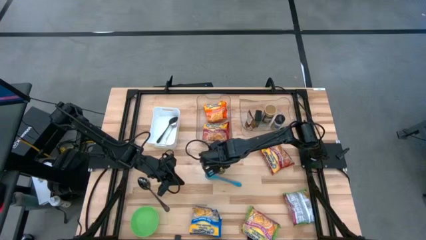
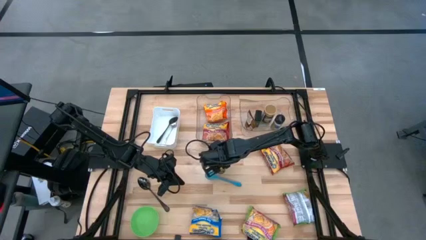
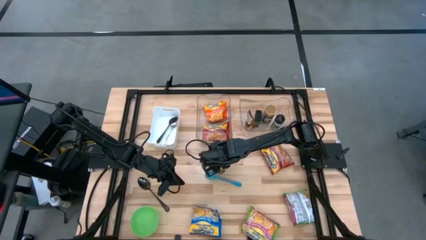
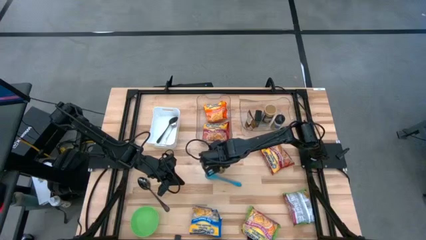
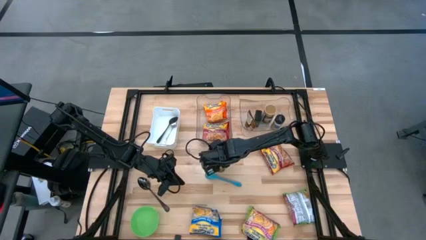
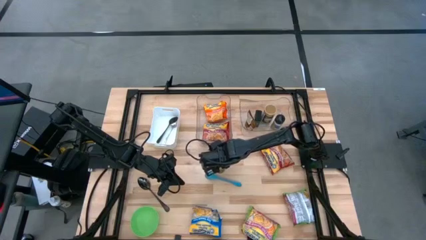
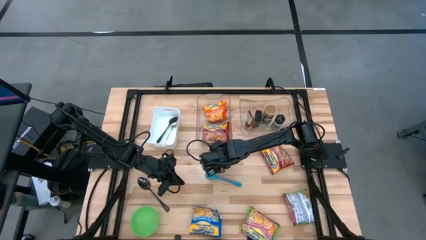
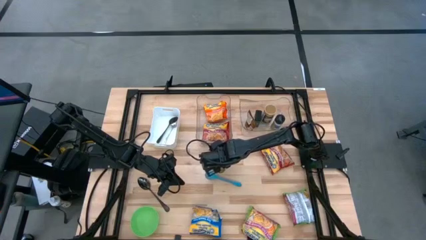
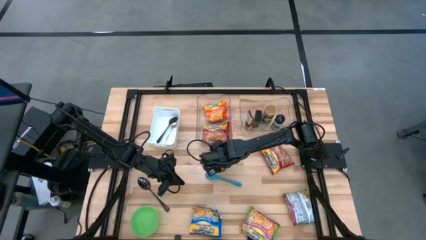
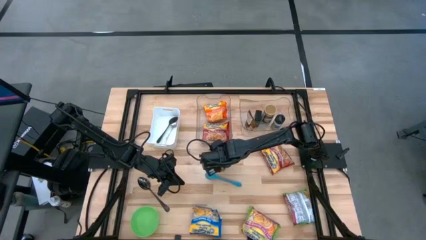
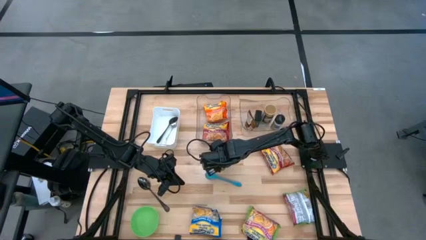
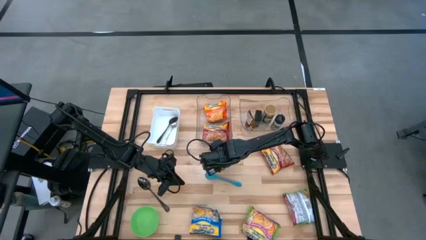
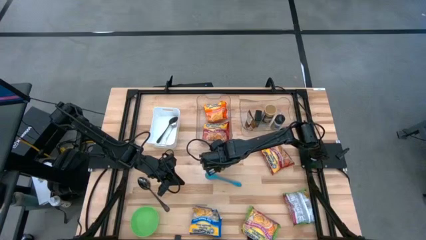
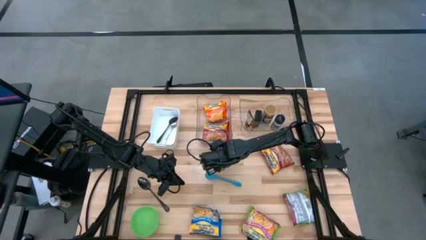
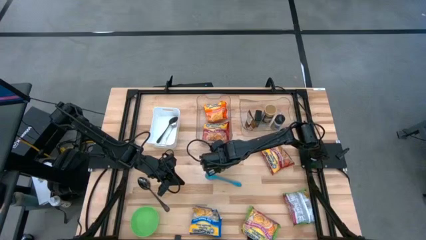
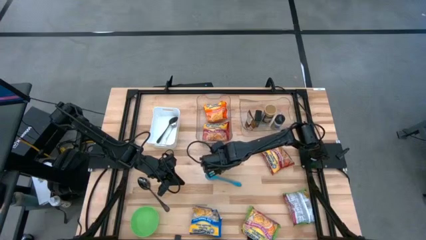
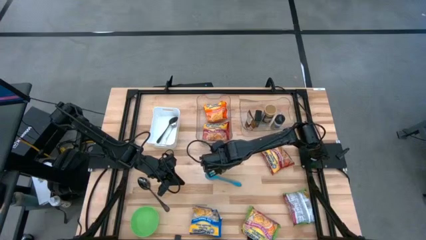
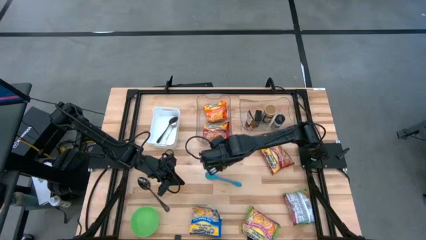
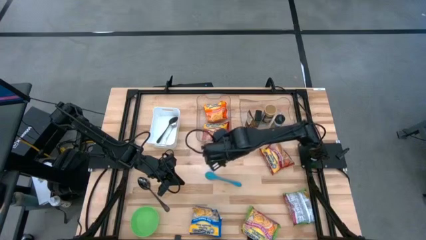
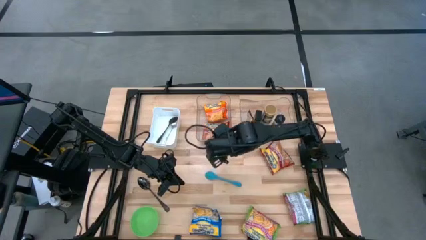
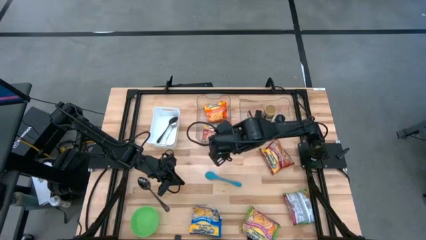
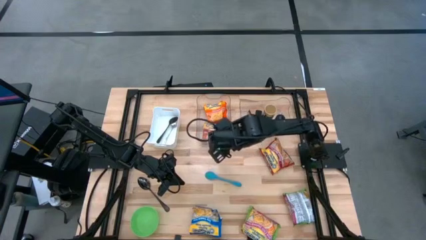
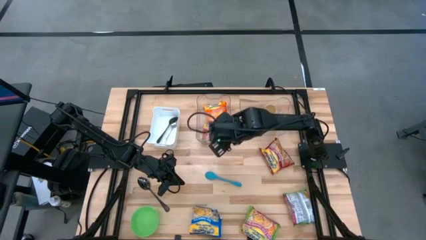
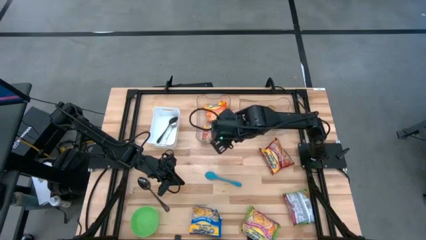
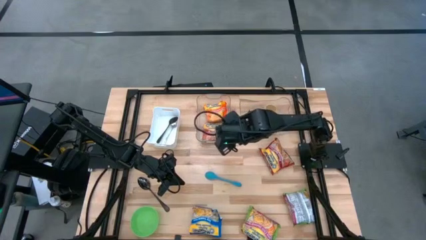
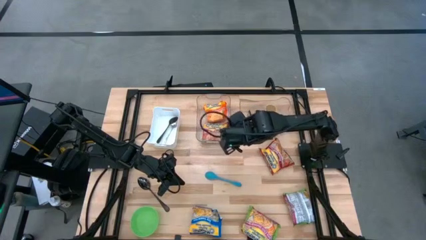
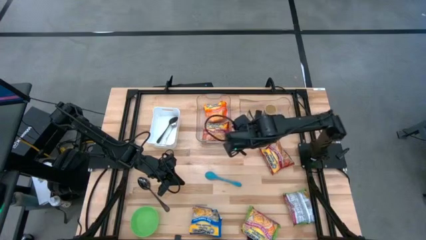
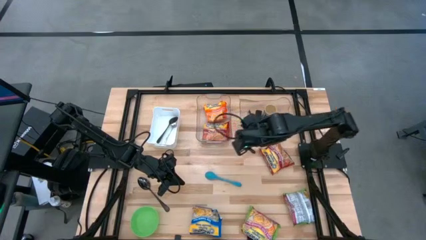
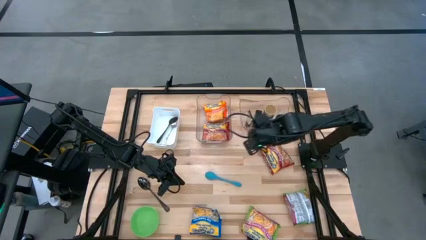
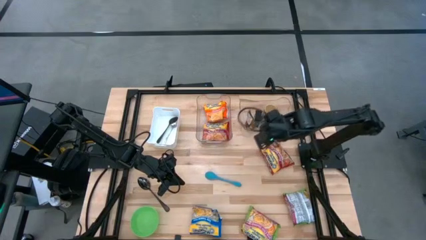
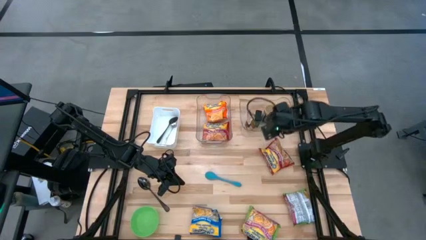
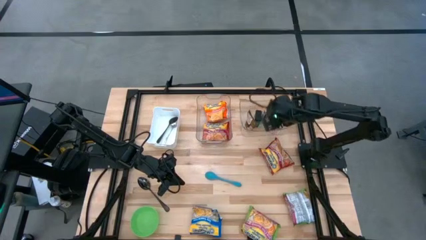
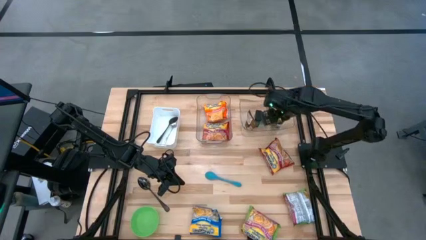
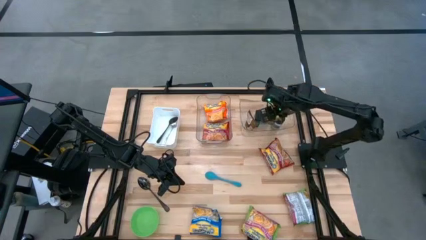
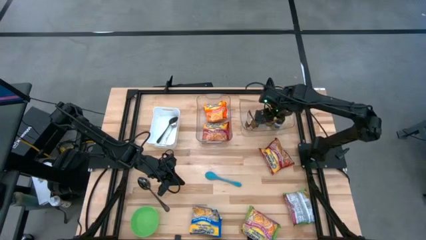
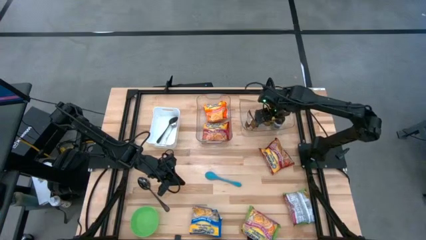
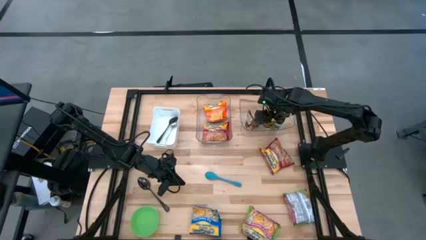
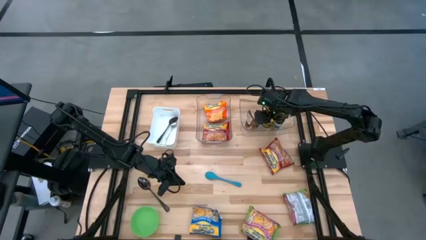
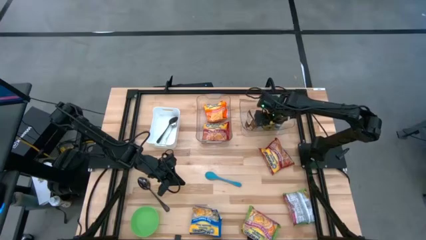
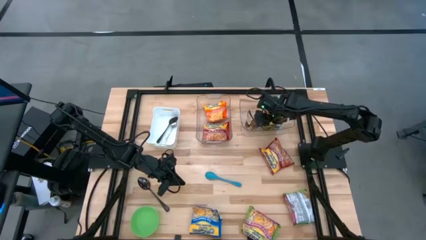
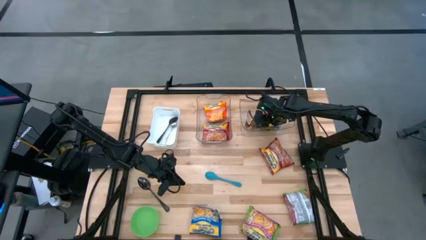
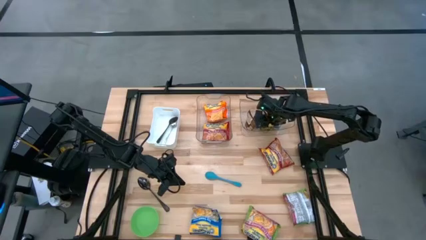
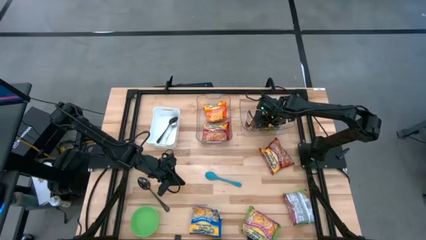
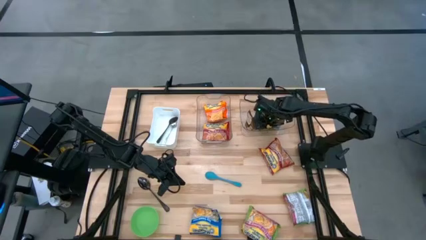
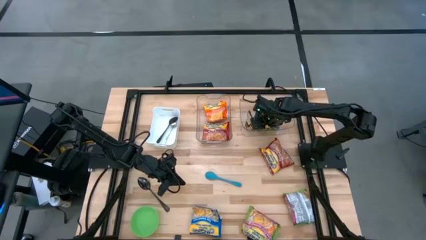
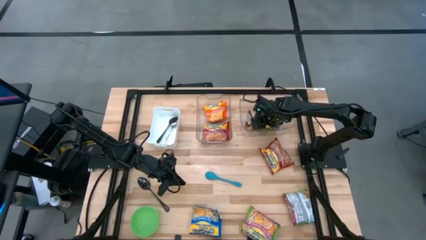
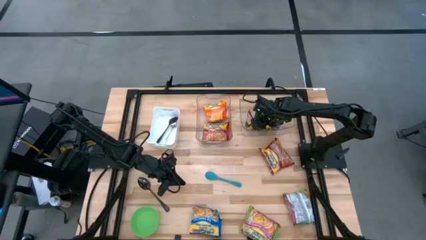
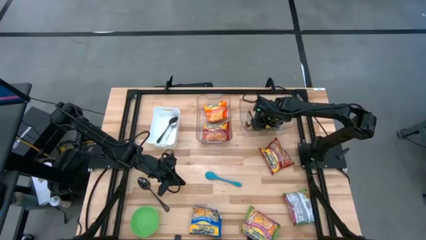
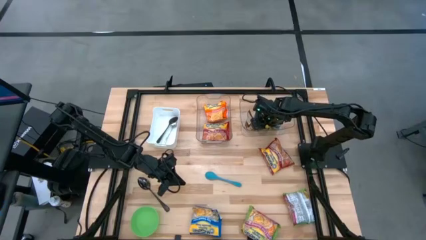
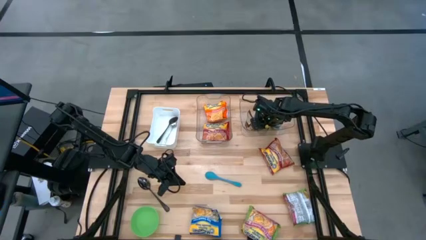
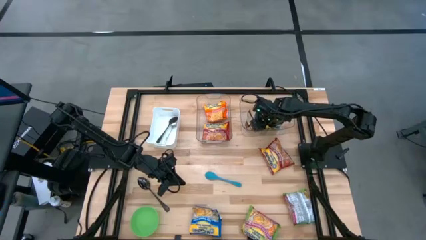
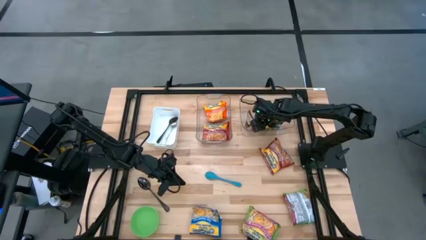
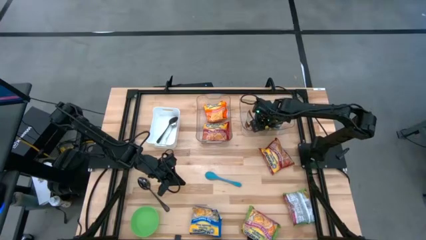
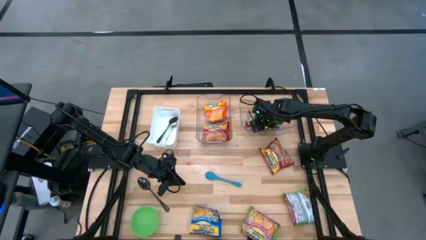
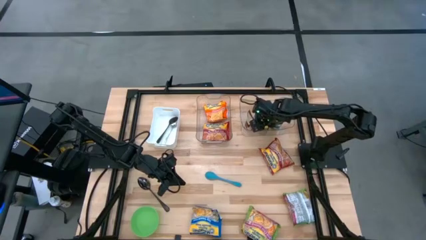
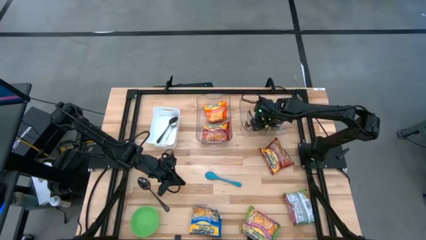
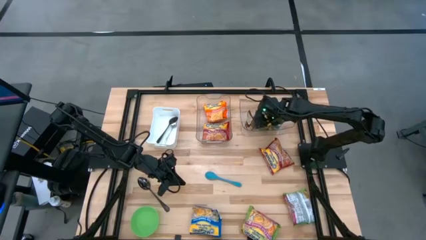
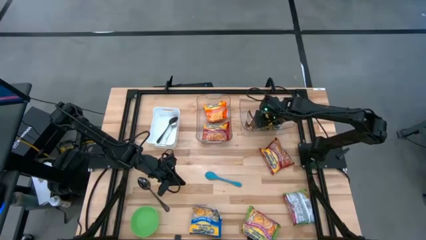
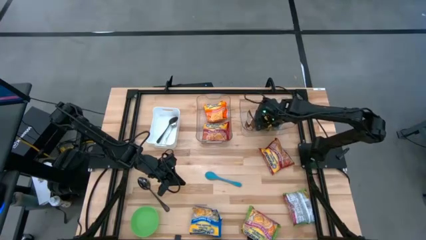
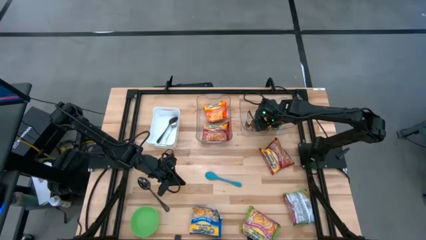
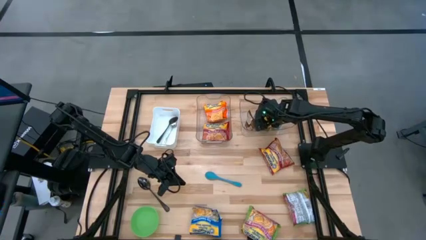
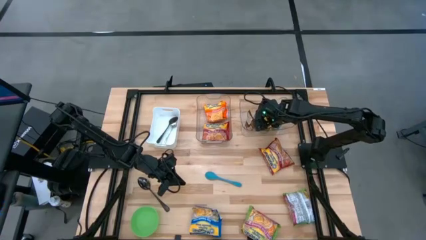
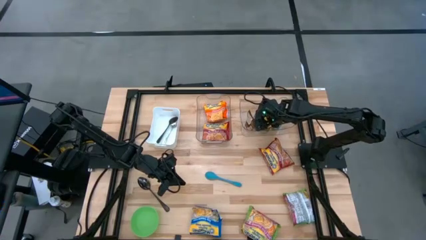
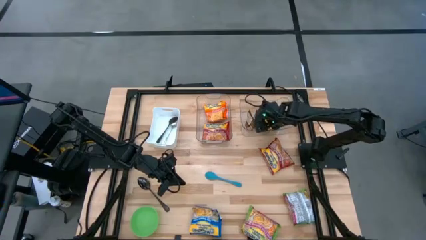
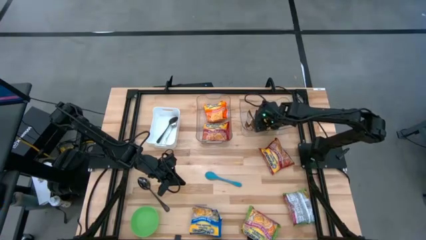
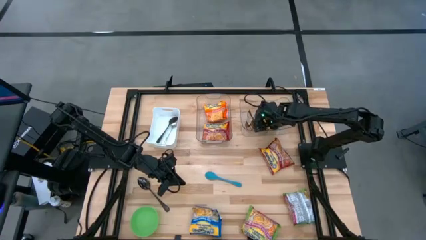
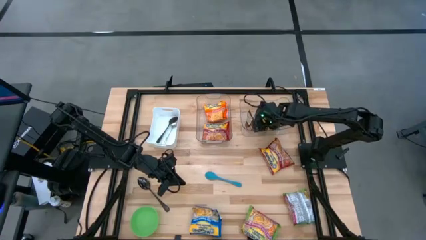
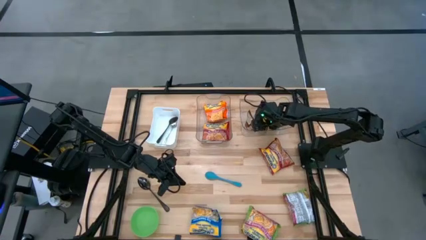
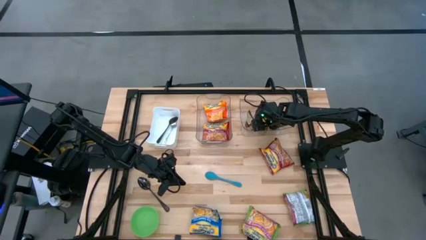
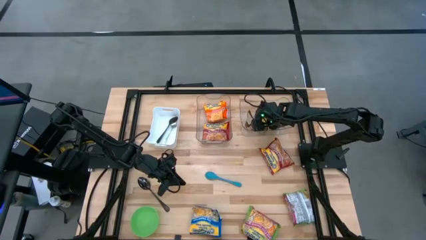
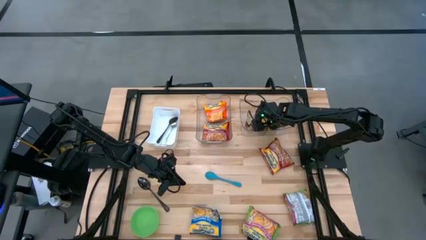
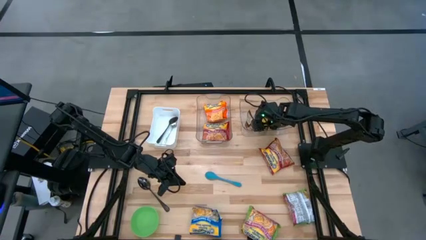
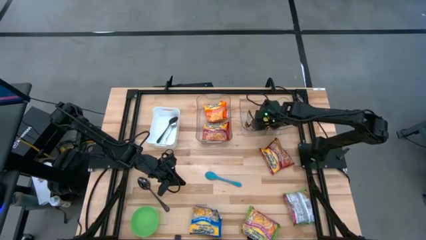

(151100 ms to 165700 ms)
Task: Pick & Place Food Item
Put the yellow spice bottle into the right transparent bin
